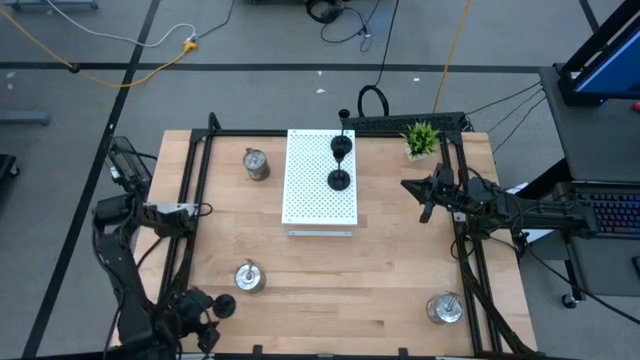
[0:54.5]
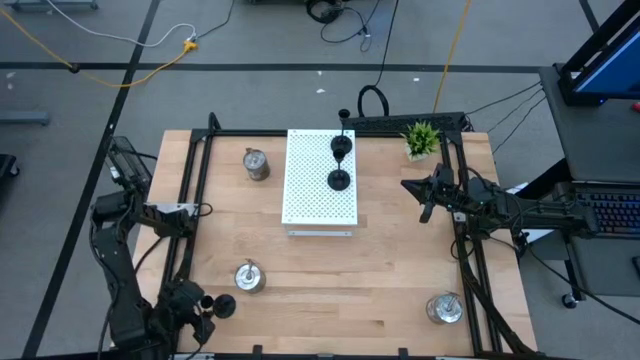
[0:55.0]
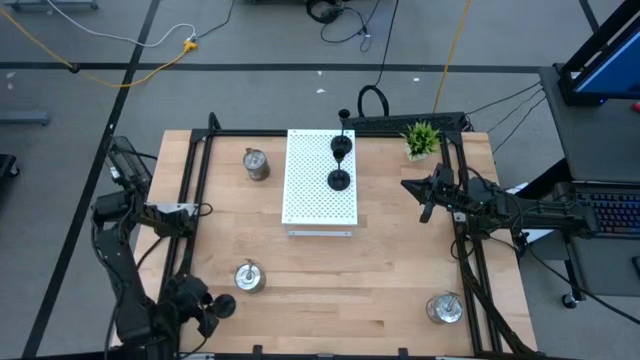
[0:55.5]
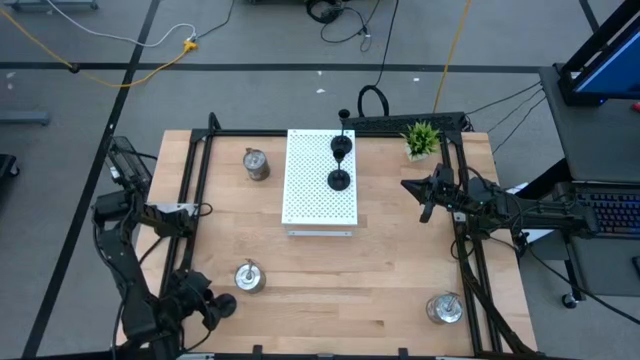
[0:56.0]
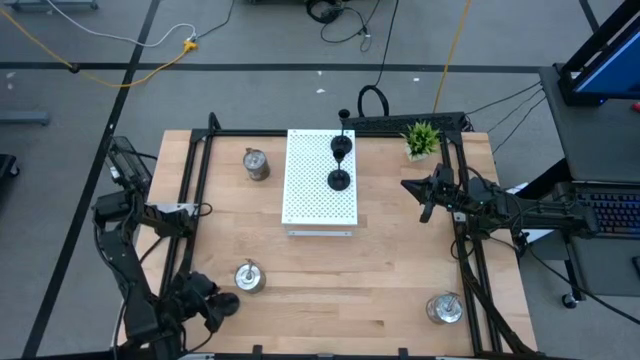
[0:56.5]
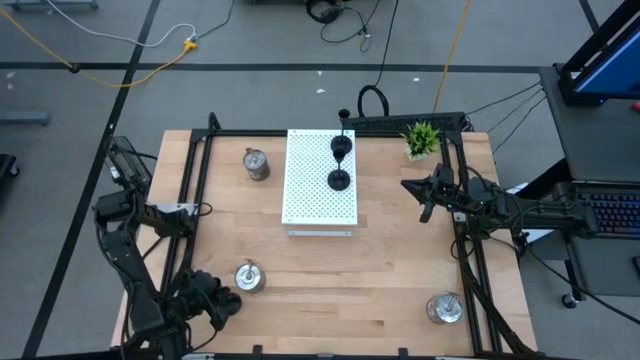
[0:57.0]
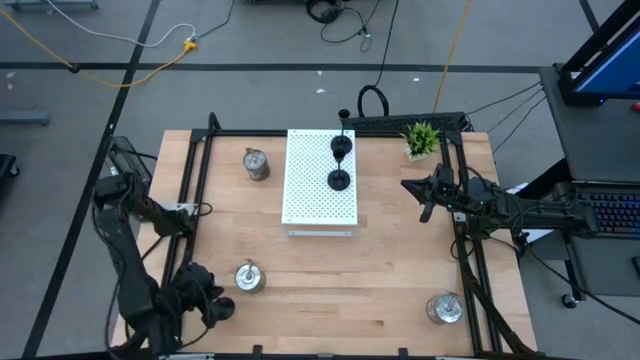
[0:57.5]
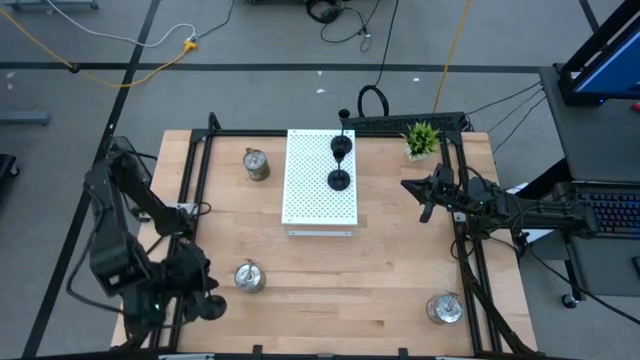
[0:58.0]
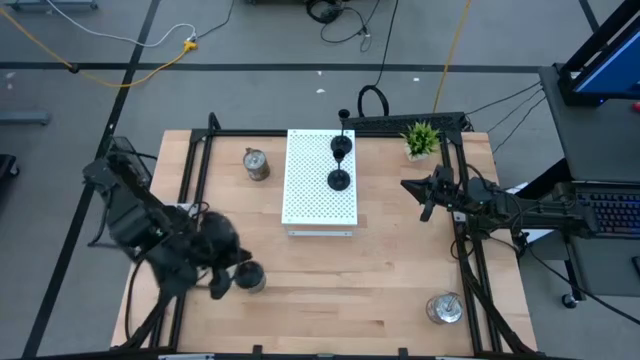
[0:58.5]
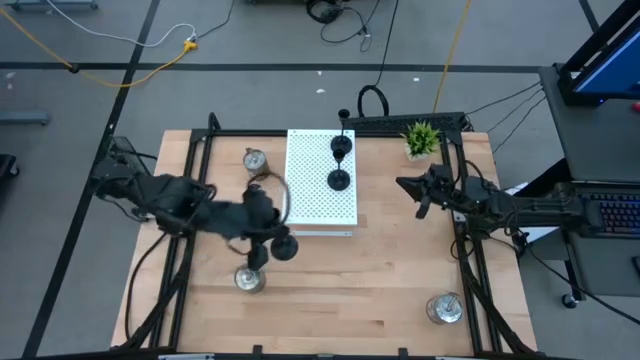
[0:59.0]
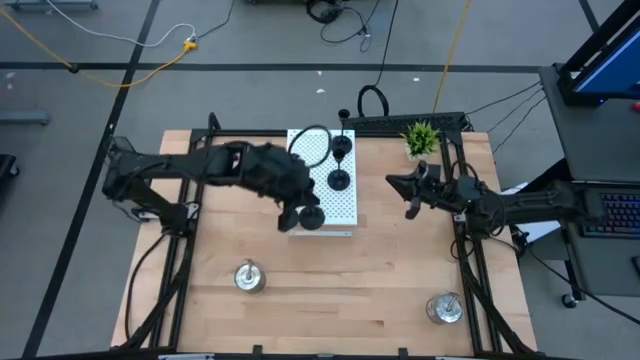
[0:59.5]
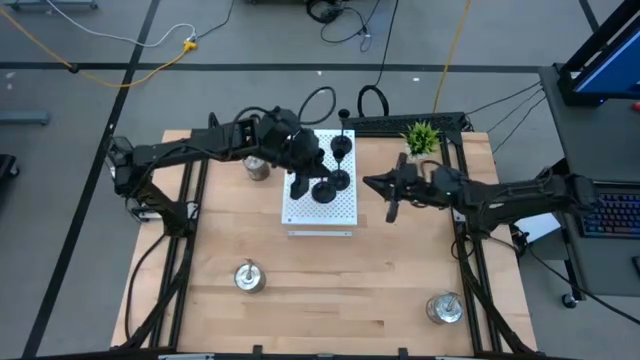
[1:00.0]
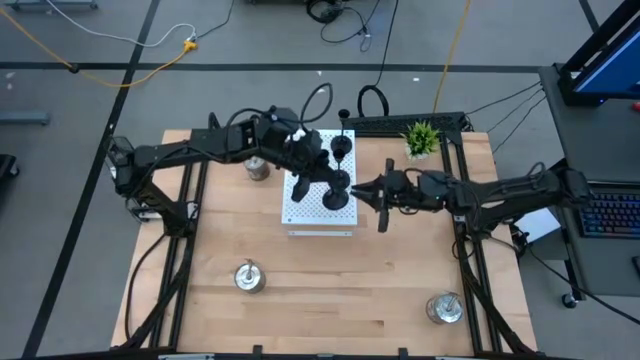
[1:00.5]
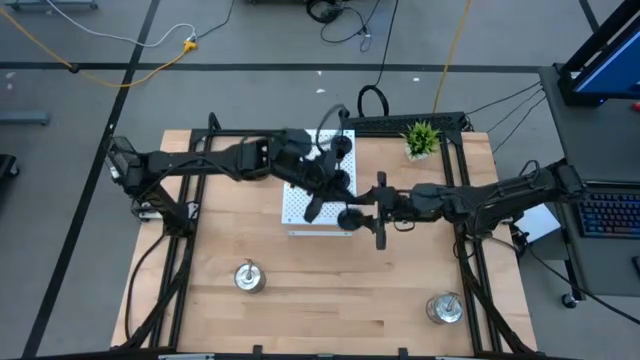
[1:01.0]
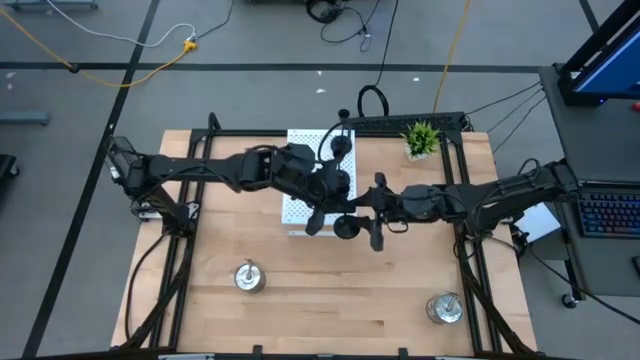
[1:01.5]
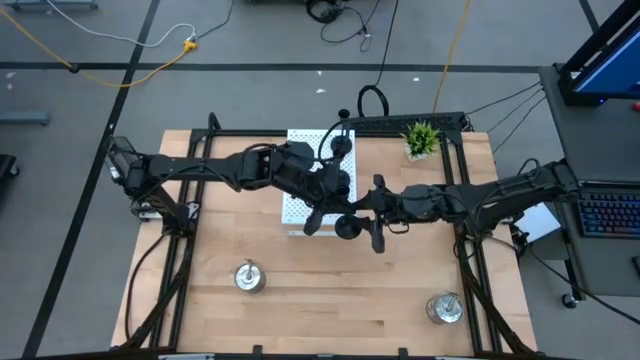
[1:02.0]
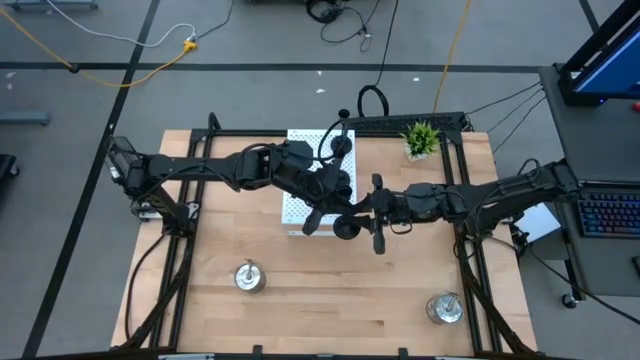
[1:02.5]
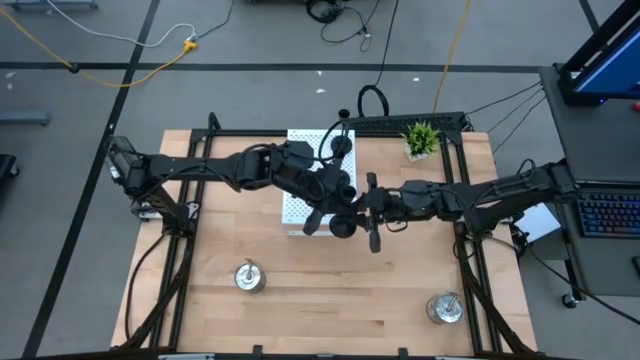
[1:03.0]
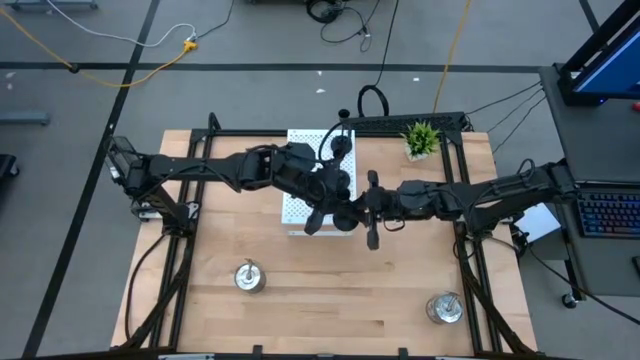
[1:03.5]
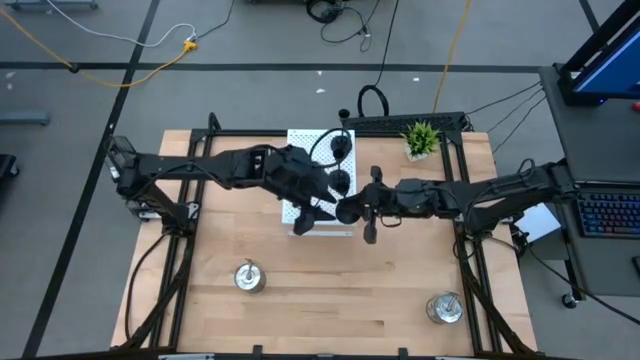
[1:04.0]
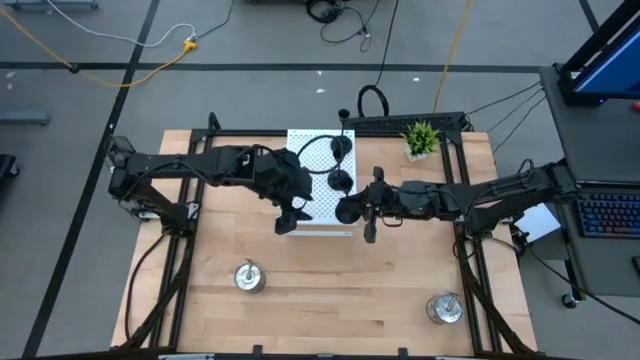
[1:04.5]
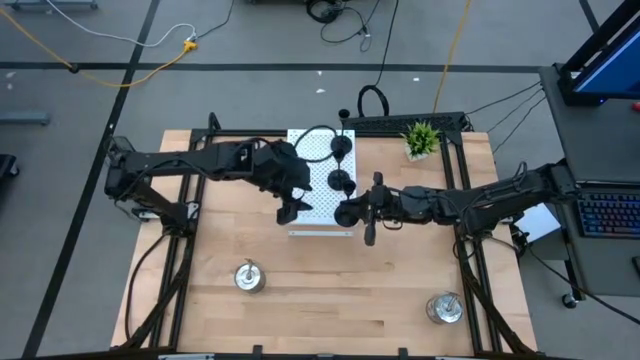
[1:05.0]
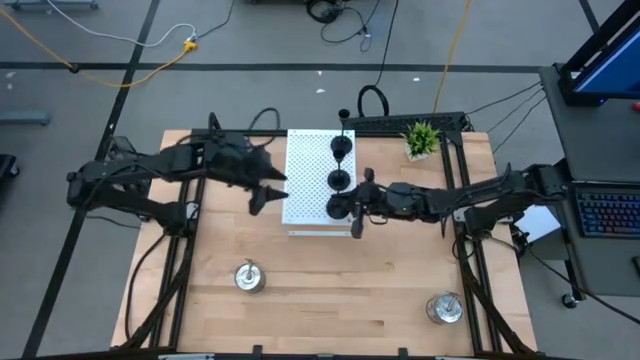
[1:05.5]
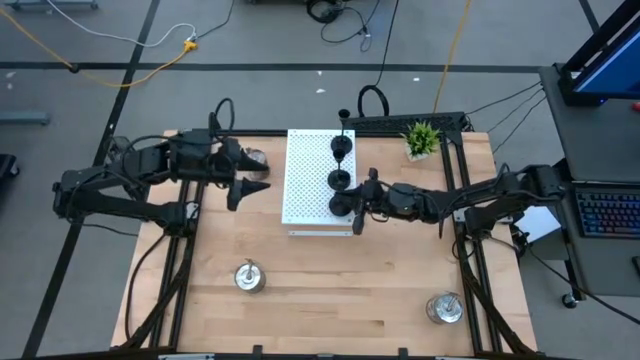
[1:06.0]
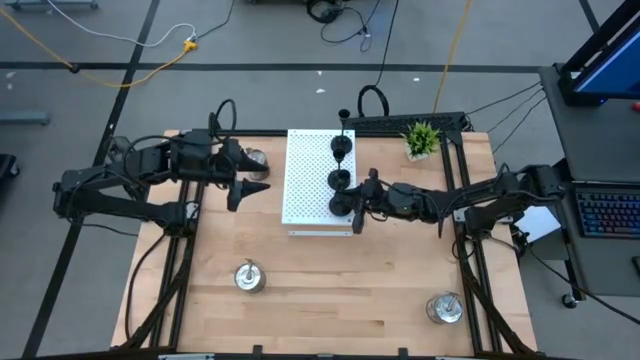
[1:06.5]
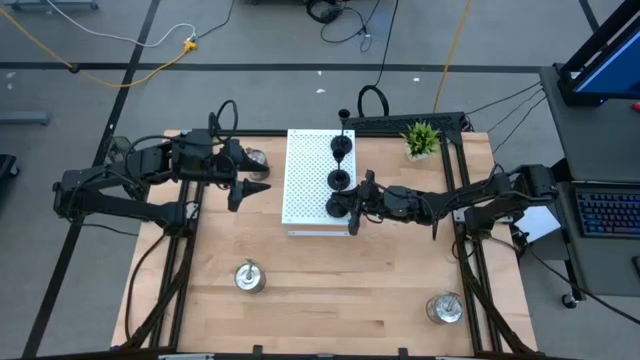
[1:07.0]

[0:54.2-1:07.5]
Task: Pick & Place candle stick holders
Put the black candle holder on the shelf aligned with the other black candle holders

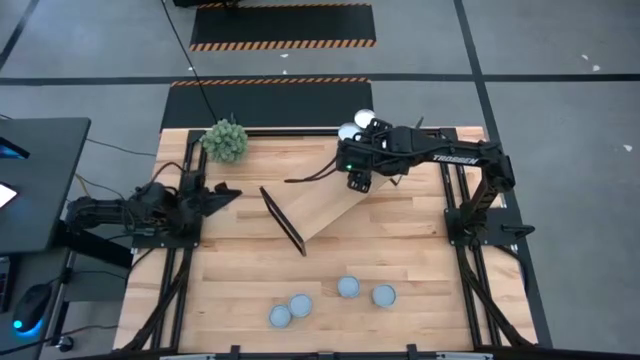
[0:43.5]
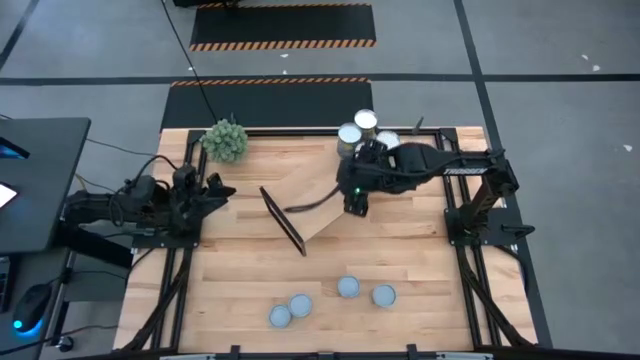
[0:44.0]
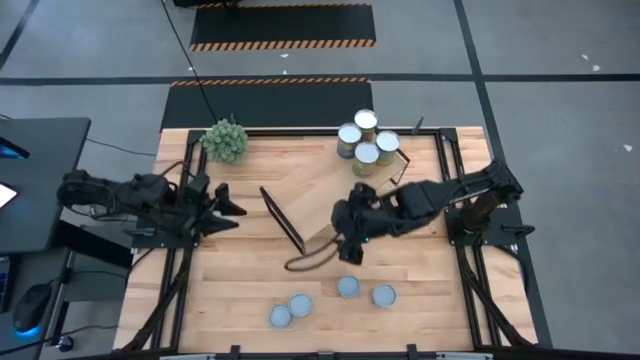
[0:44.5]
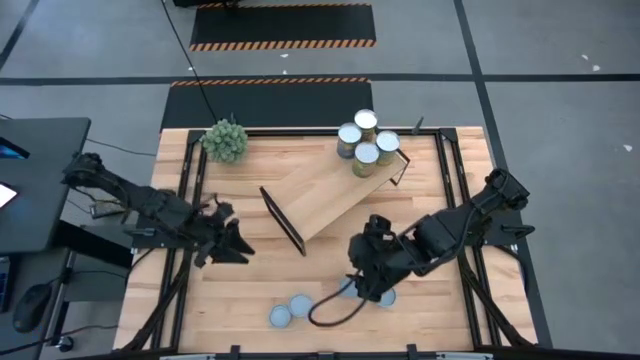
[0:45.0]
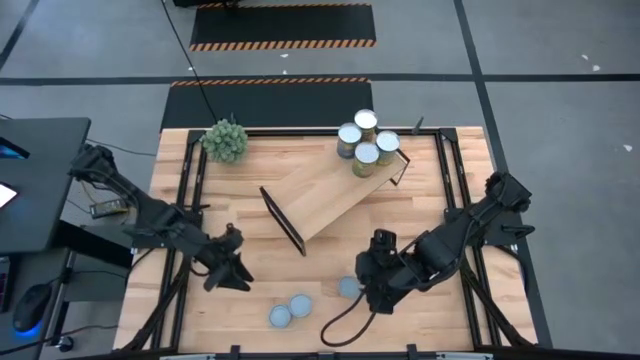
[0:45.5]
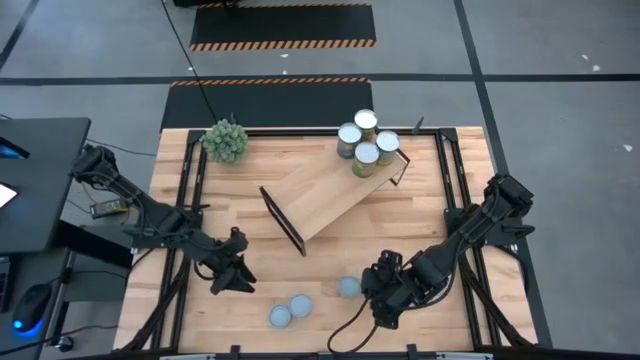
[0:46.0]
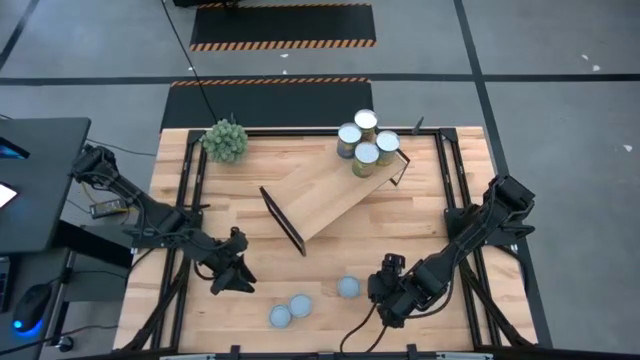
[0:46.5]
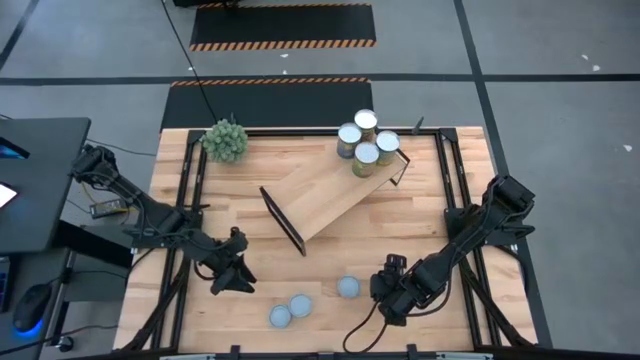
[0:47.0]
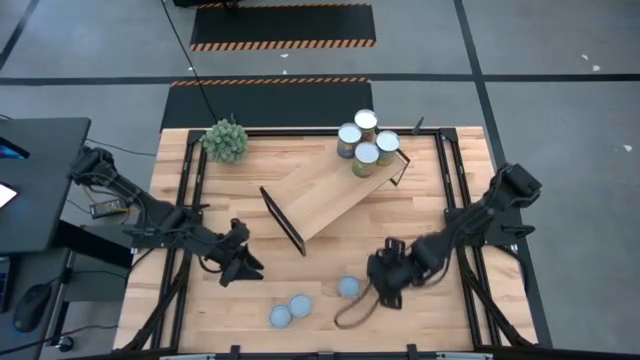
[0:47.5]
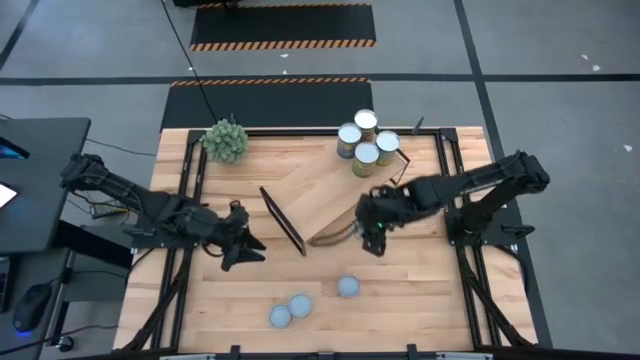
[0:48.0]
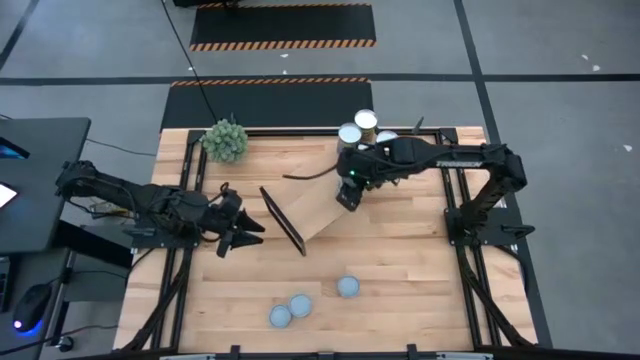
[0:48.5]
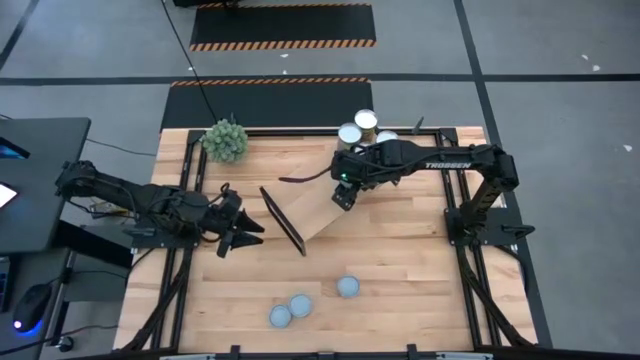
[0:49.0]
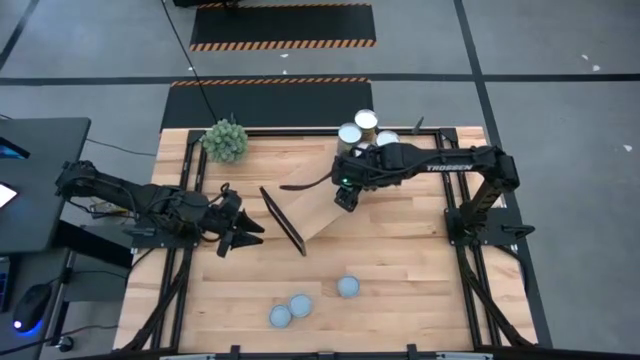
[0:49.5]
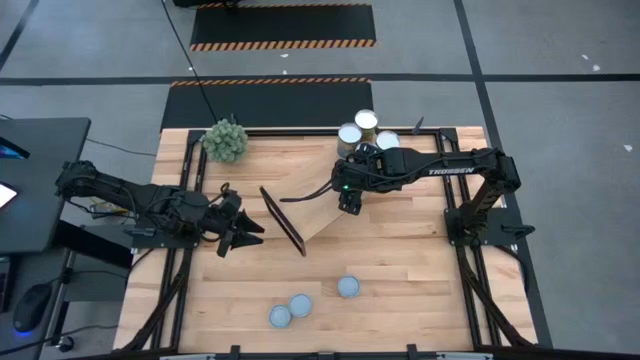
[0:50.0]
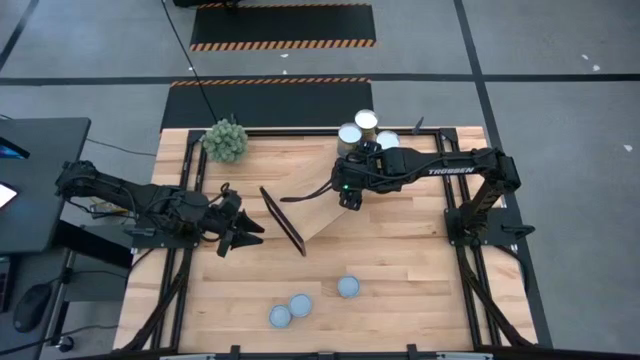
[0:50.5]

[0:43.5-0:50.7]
Task: Pick and place cans onto a shelf
Put the canned mix vegetable on the shelf
